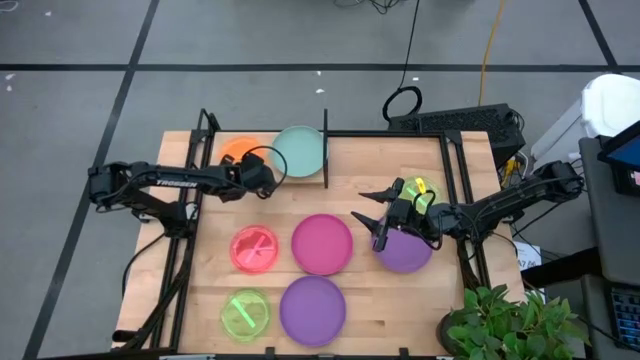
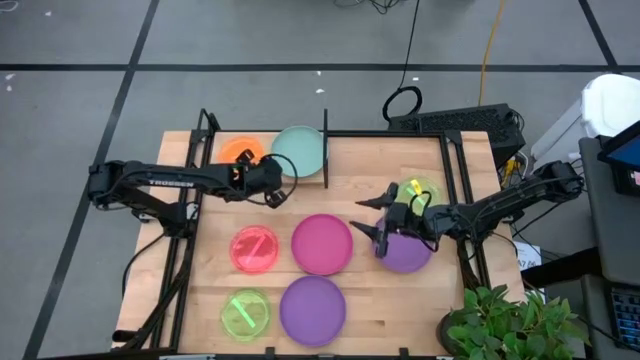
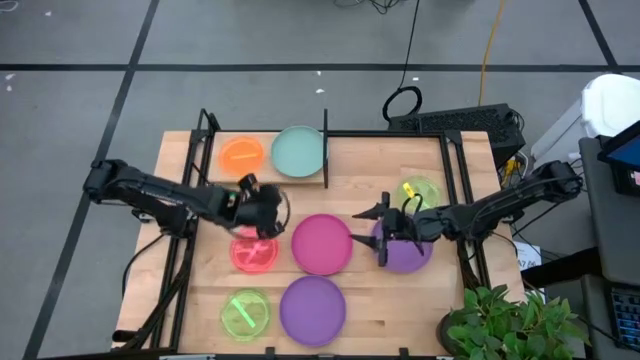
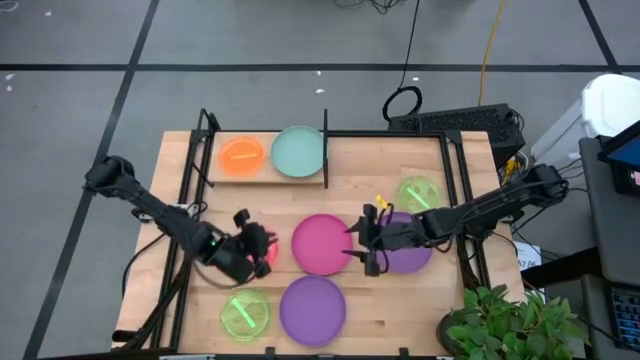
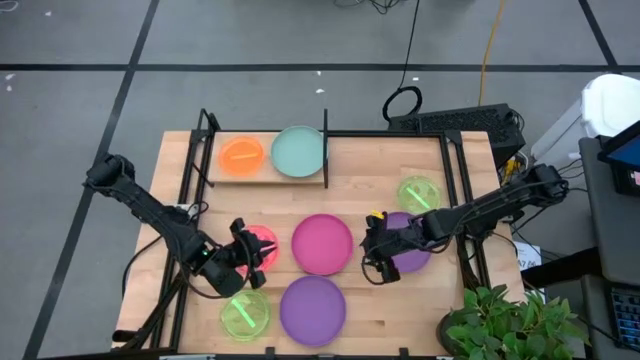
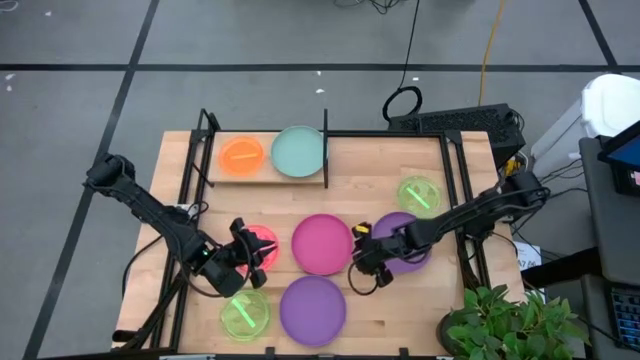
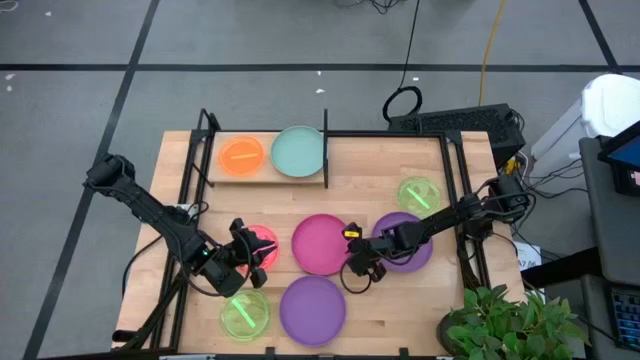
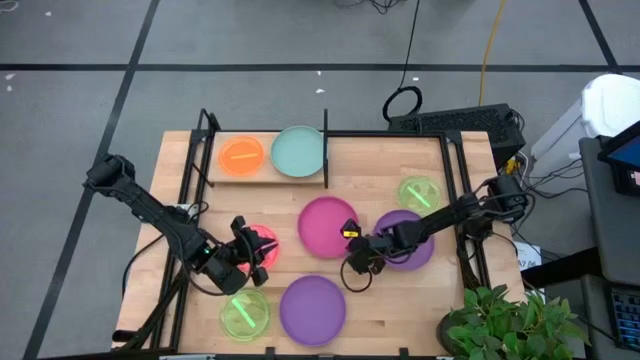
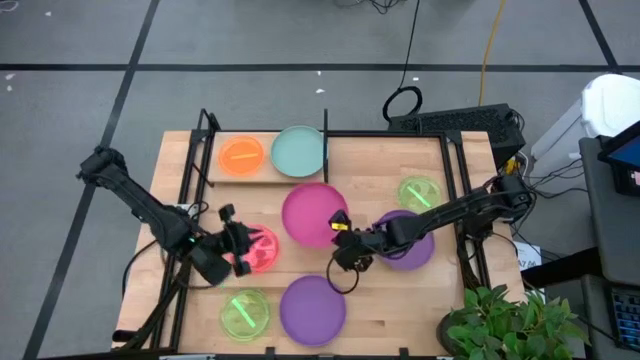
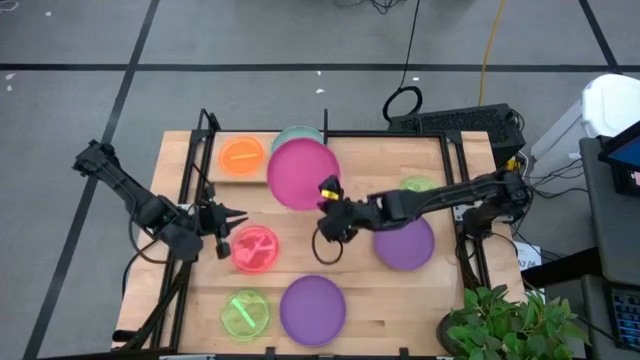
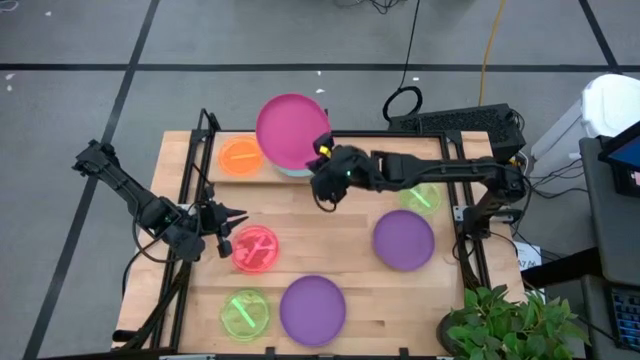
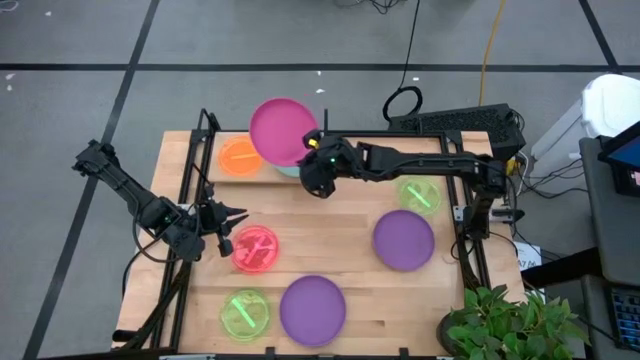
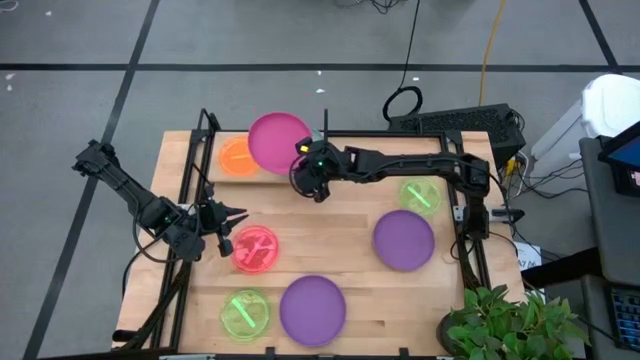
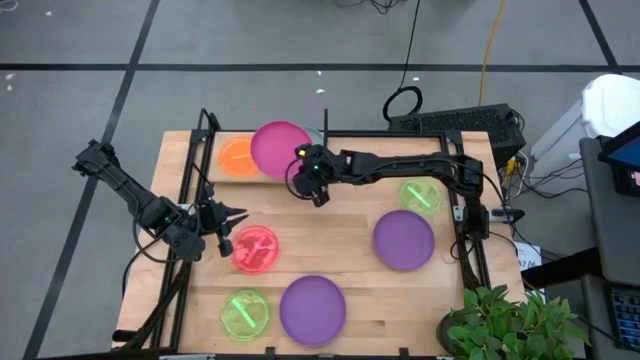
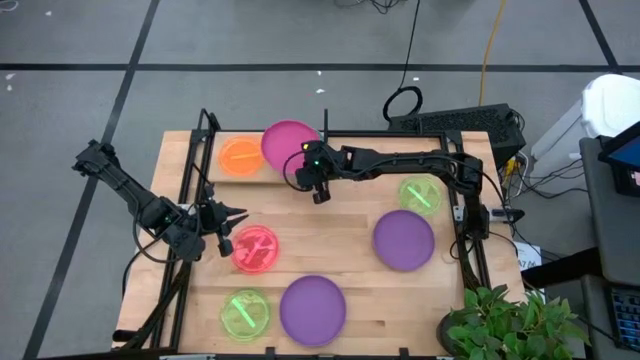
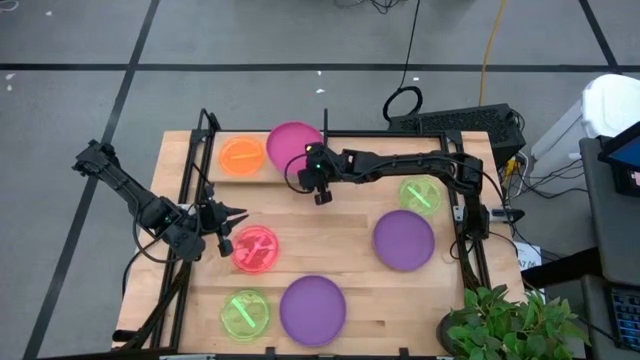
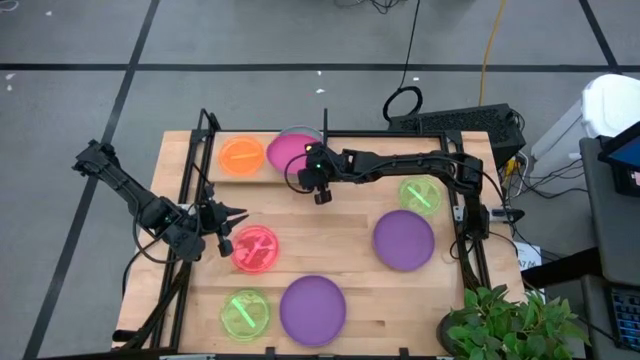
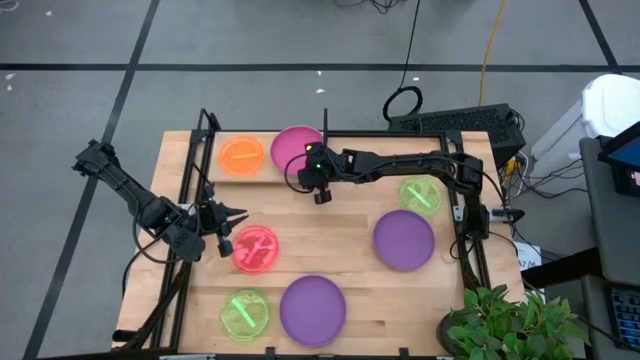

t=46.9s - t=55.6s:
Task: Place and stack plates onto a shelf
Stack the pink plate on the blue plate on the shelf

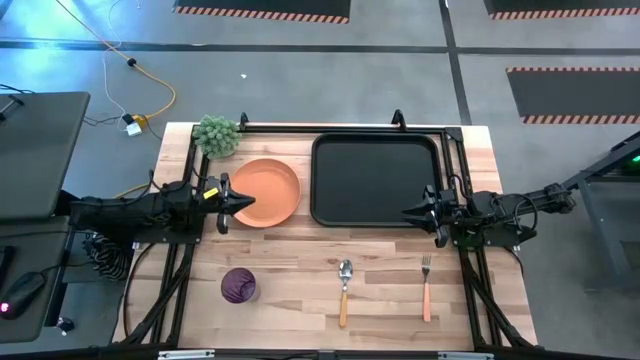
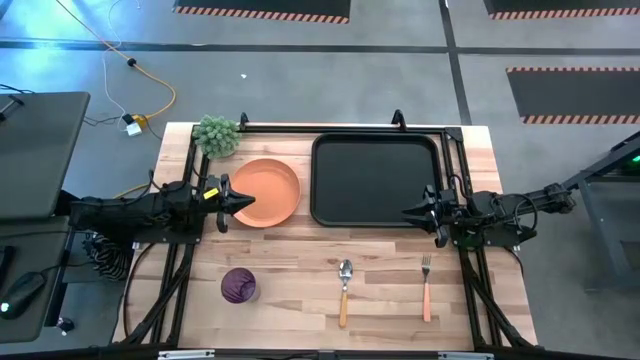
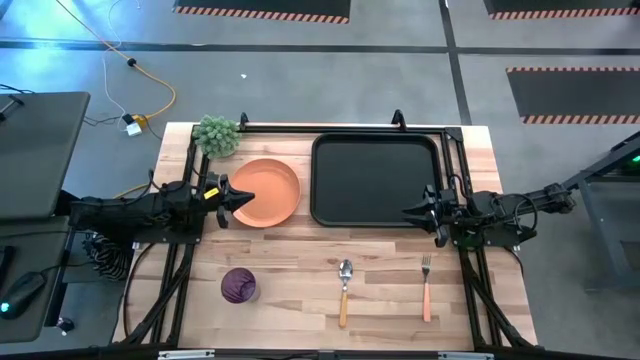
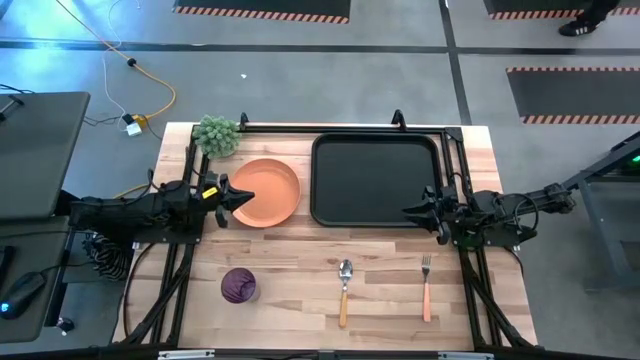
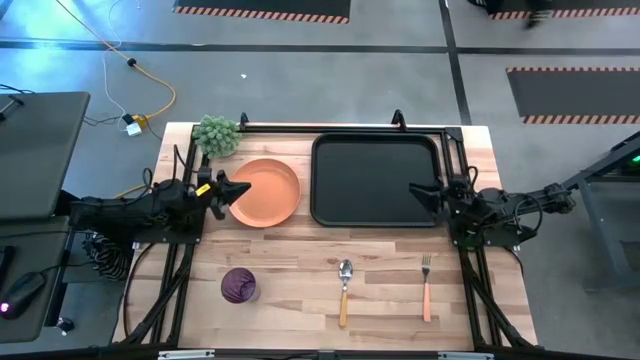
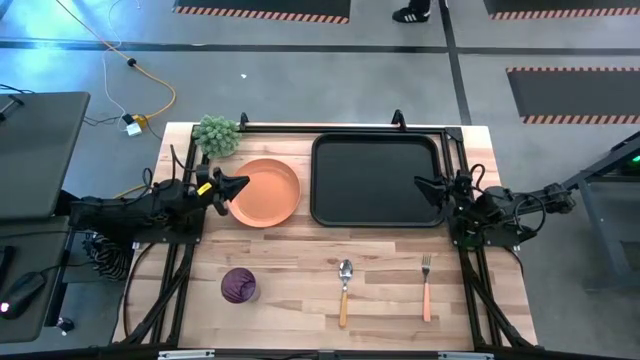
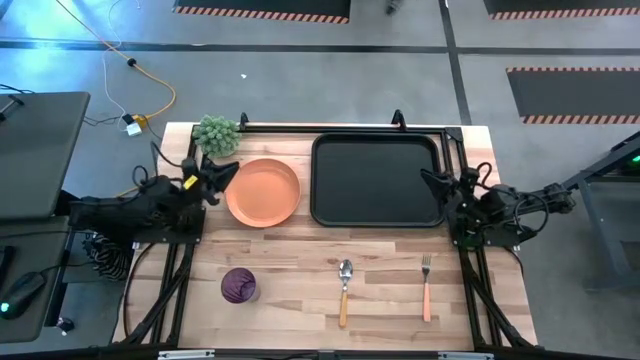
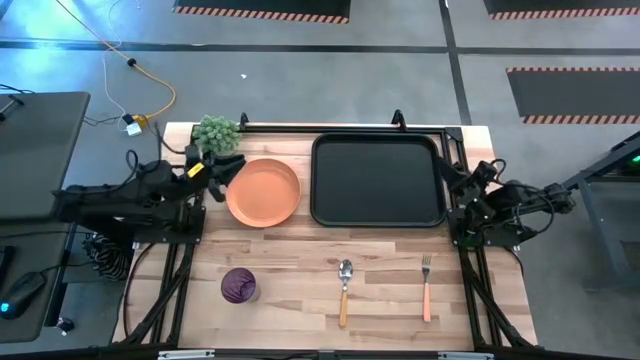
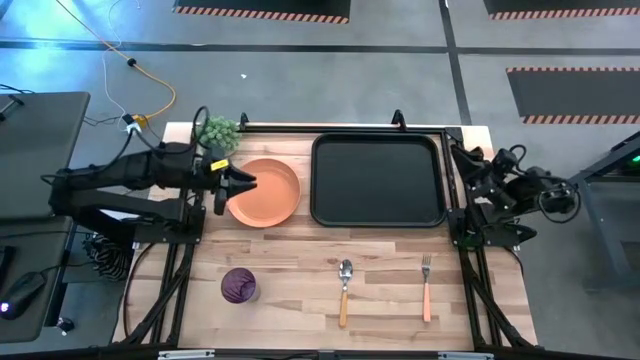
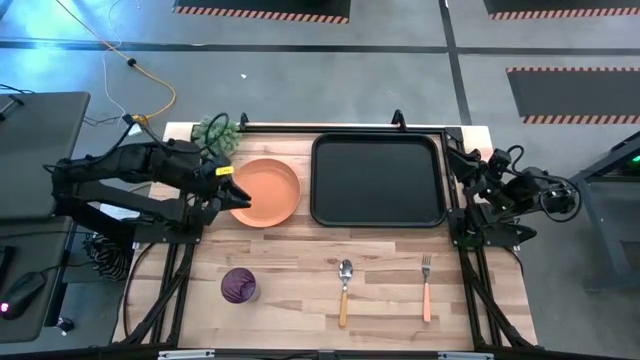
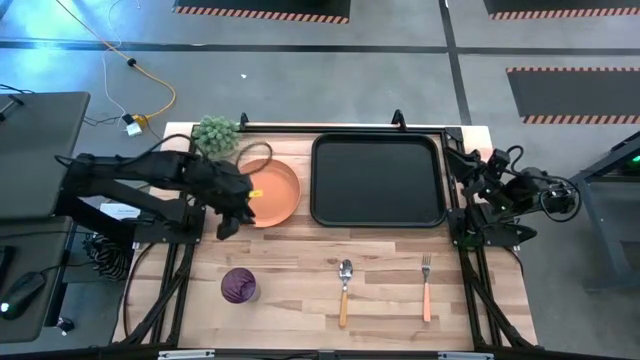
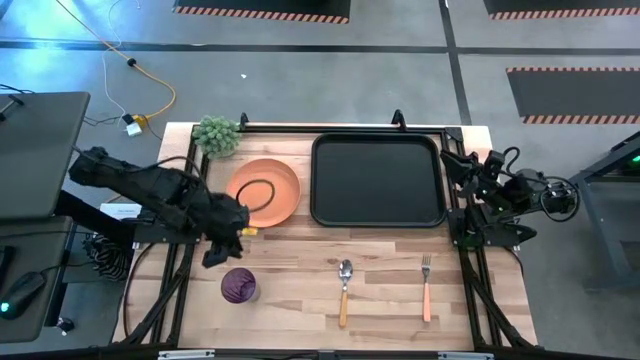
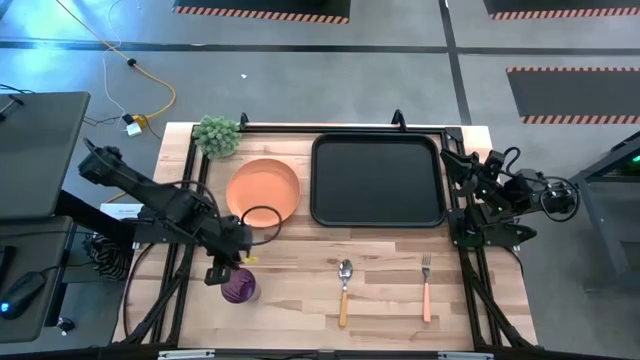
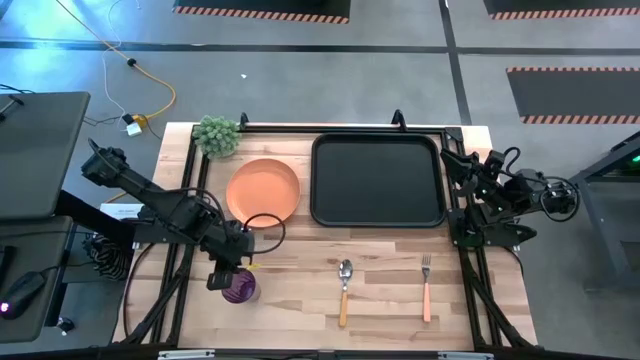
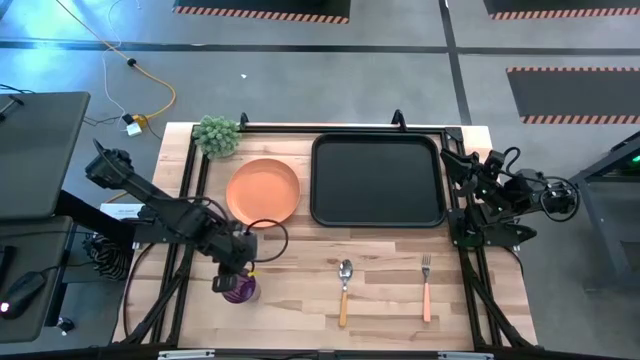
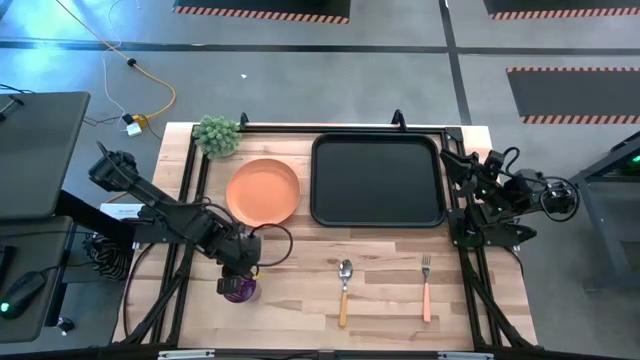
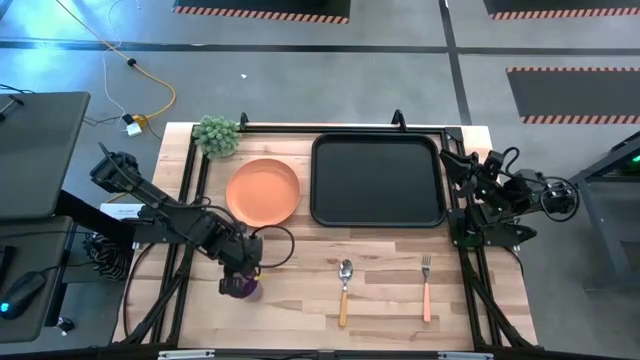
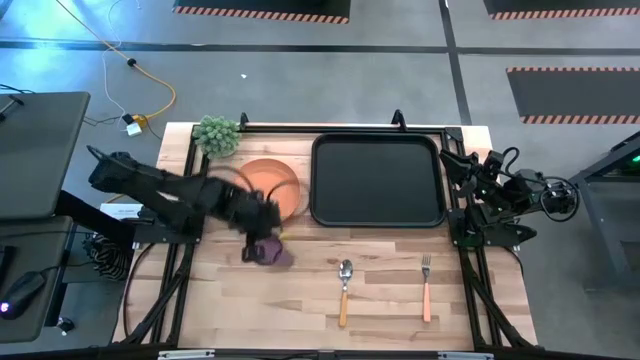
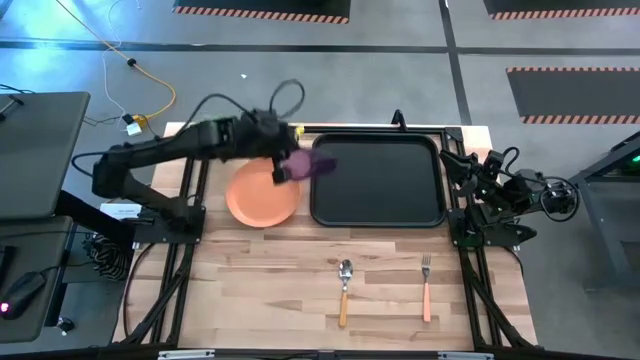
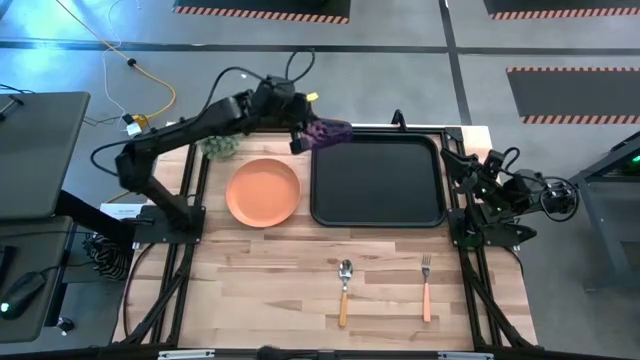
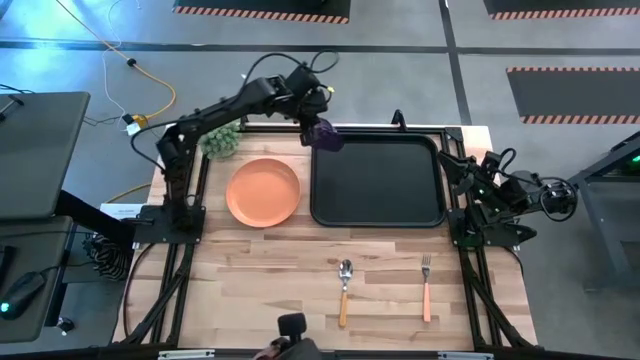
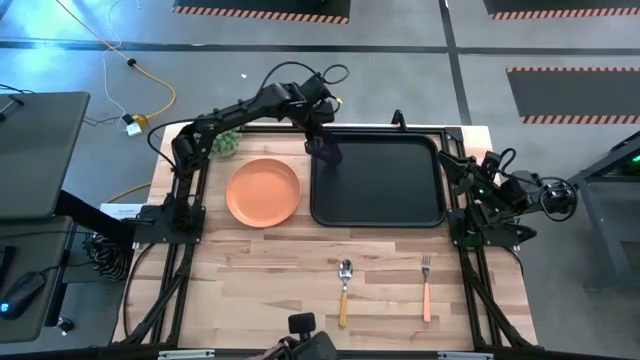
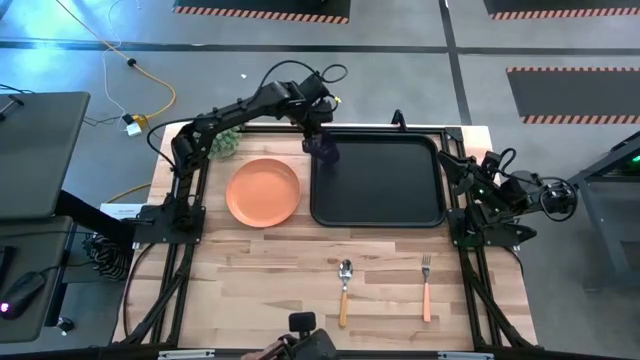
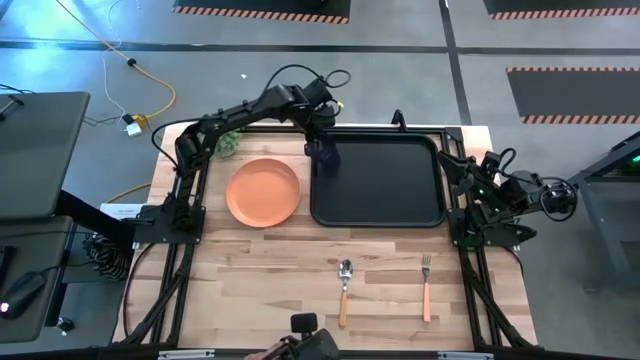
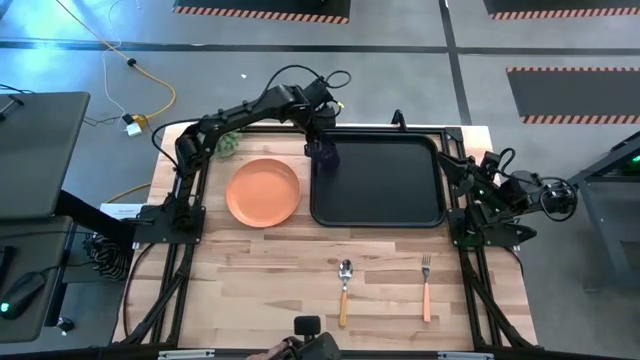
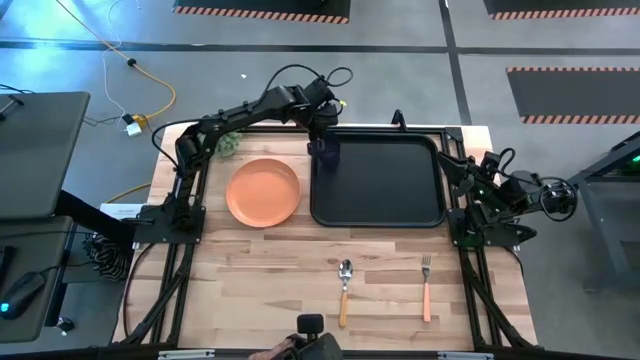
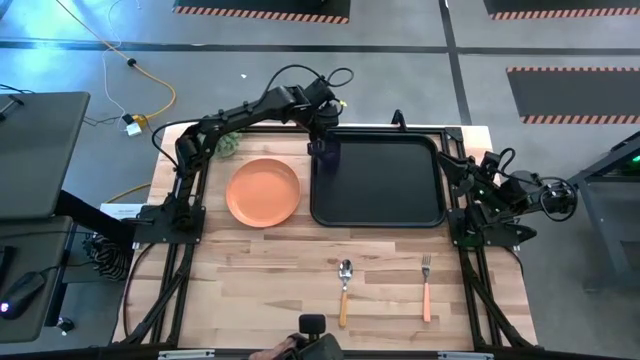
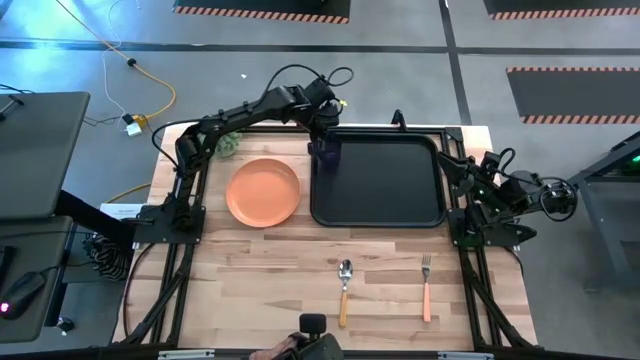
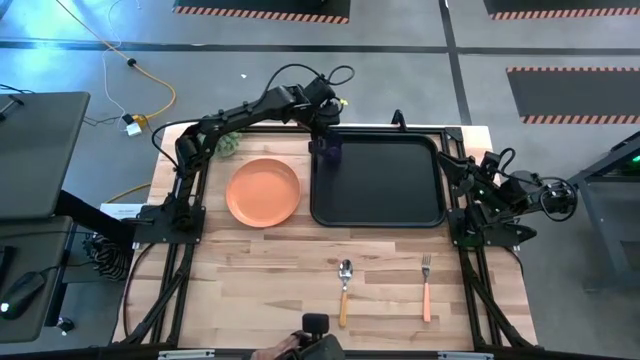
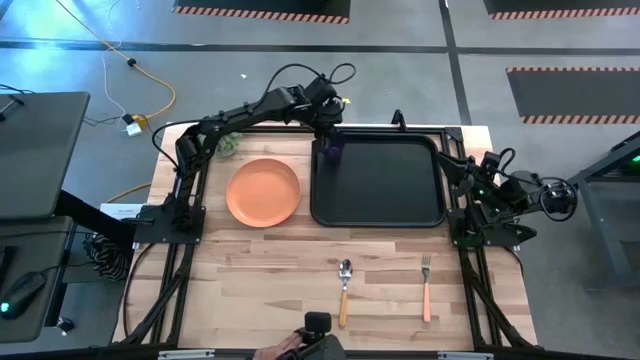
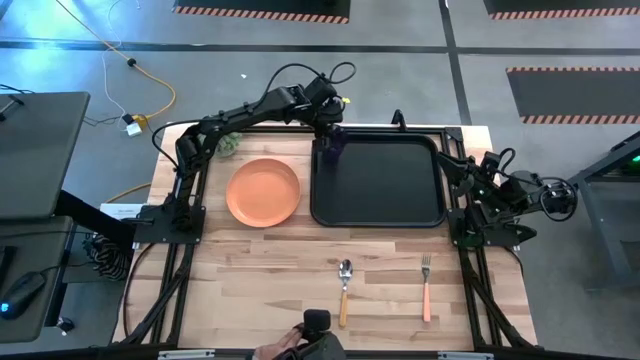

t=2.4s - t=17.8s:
Task: Pick and place plate/cup/fork/spoon on tray
Put the purple cup on top the top left side of the black serving tray
